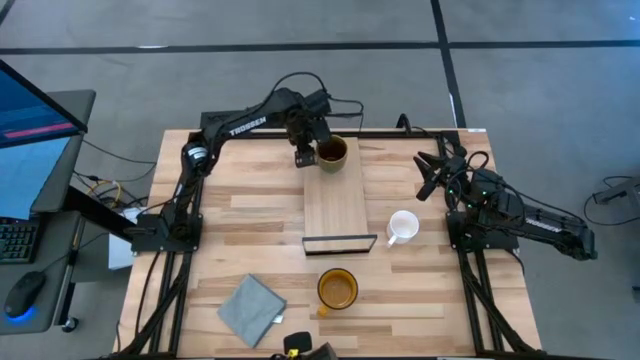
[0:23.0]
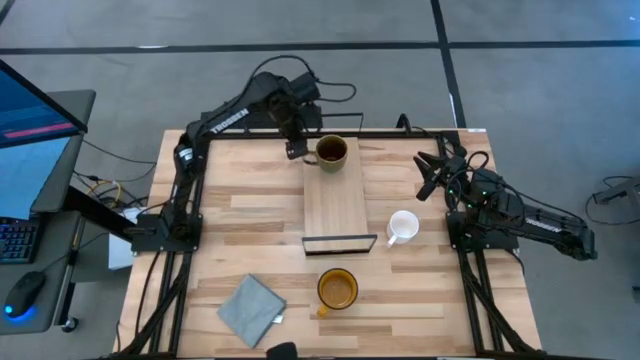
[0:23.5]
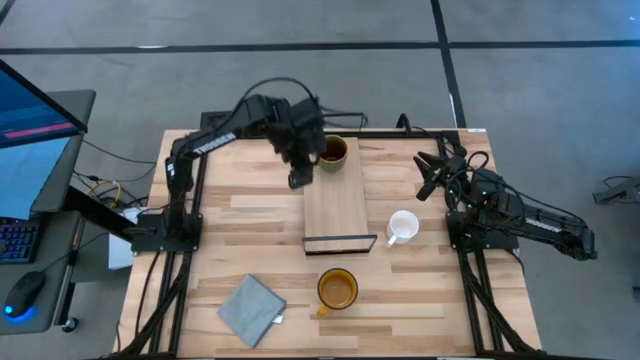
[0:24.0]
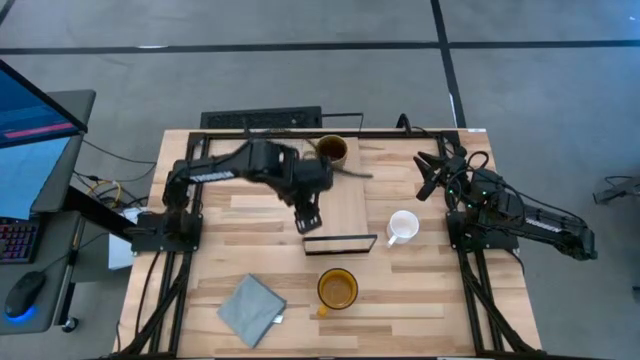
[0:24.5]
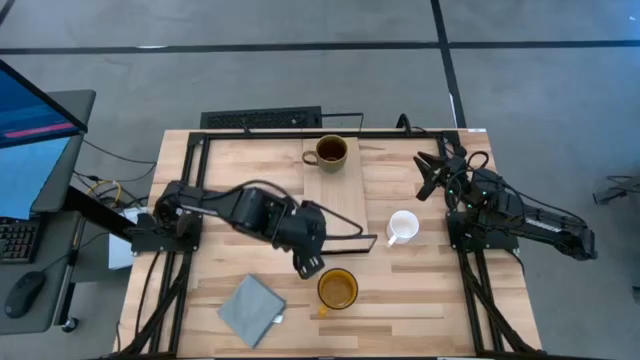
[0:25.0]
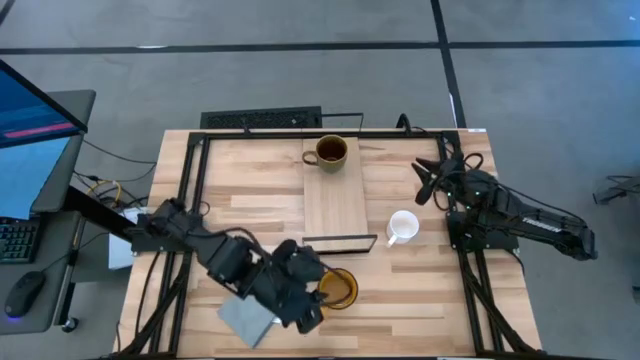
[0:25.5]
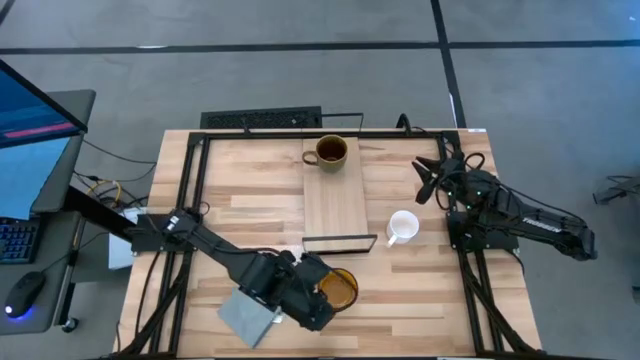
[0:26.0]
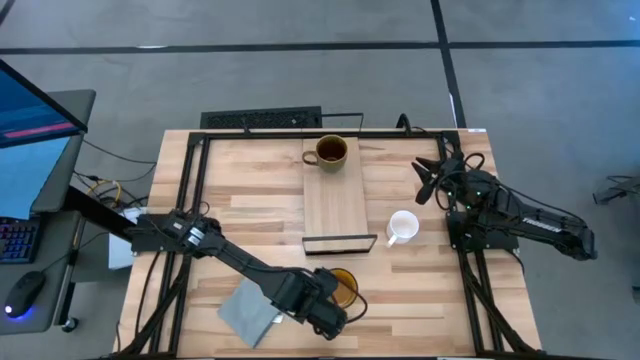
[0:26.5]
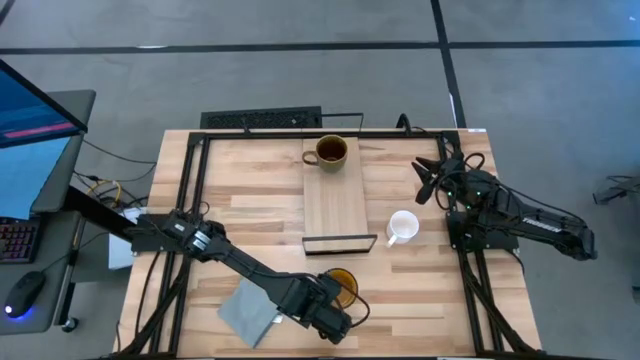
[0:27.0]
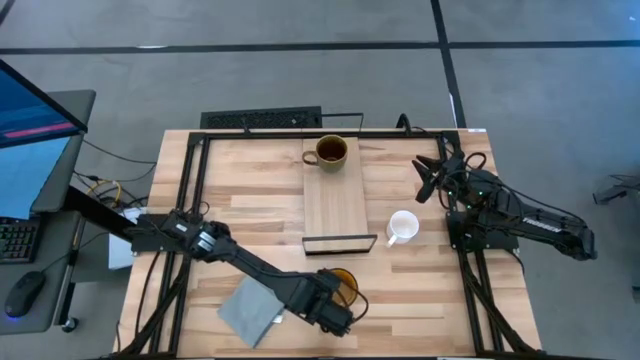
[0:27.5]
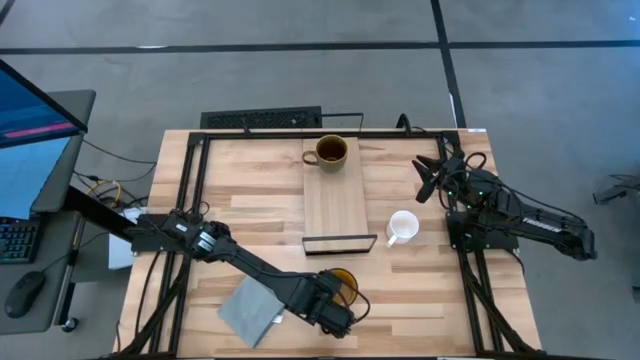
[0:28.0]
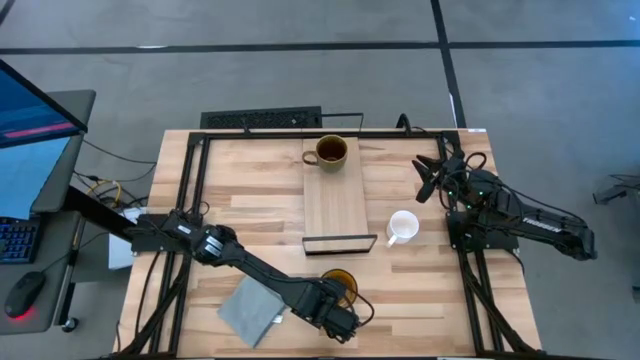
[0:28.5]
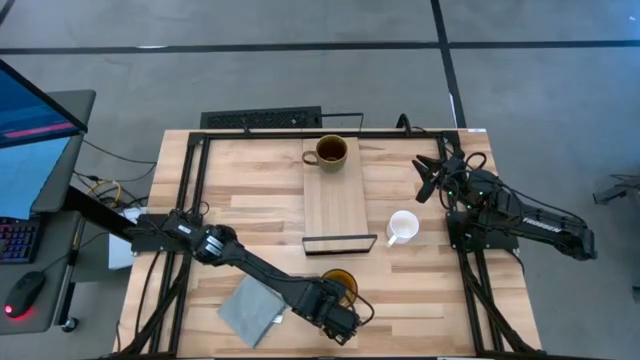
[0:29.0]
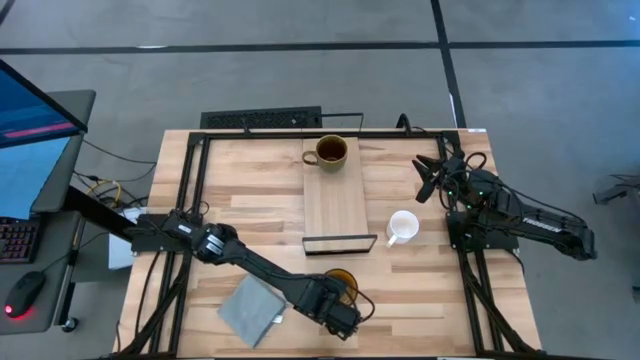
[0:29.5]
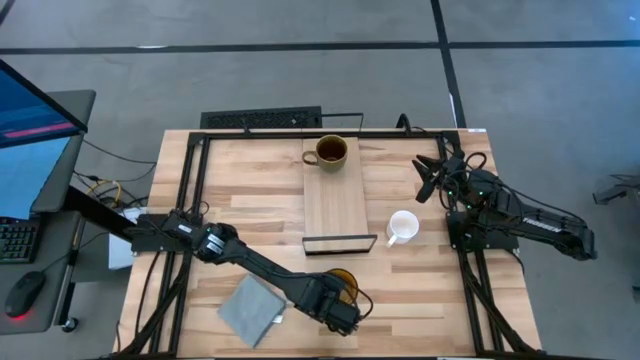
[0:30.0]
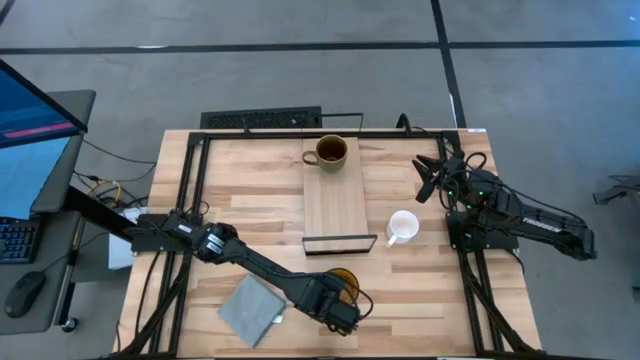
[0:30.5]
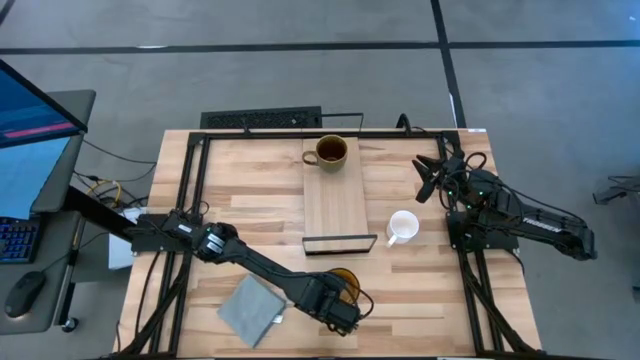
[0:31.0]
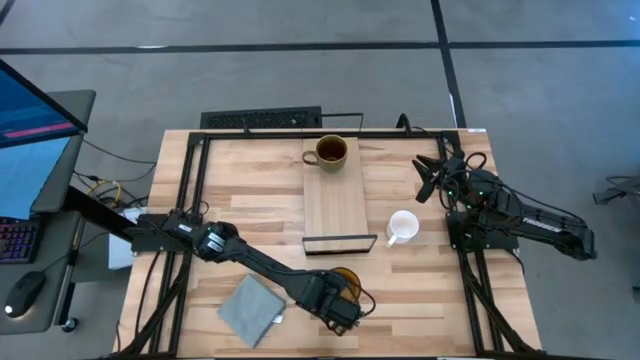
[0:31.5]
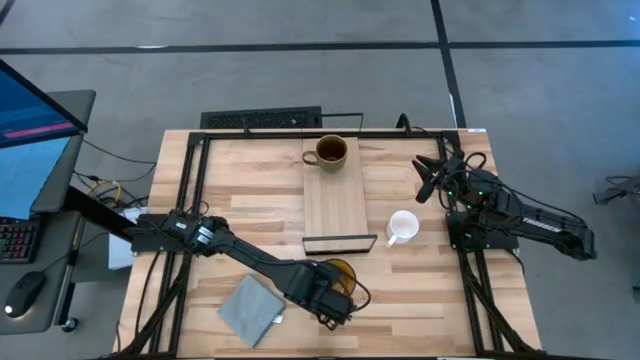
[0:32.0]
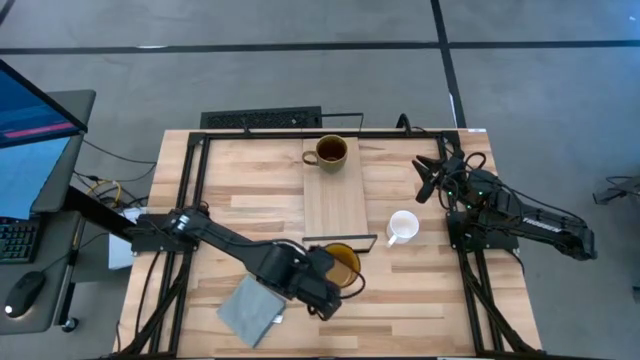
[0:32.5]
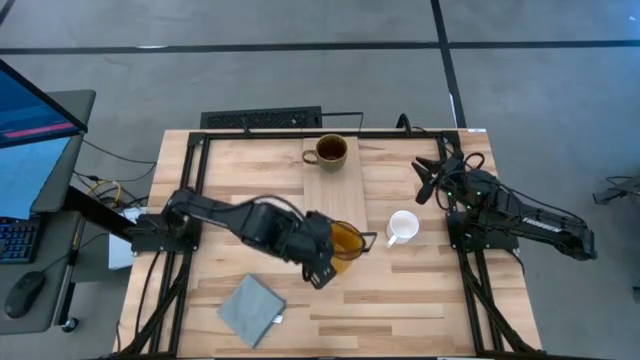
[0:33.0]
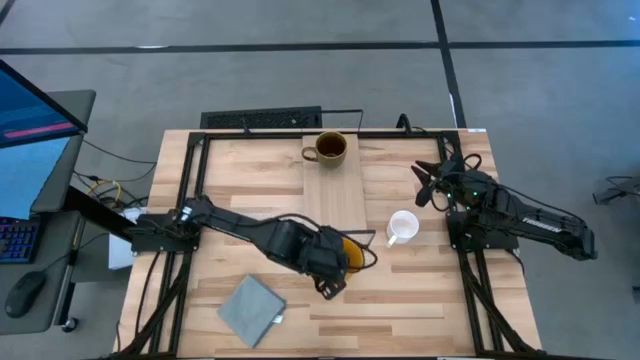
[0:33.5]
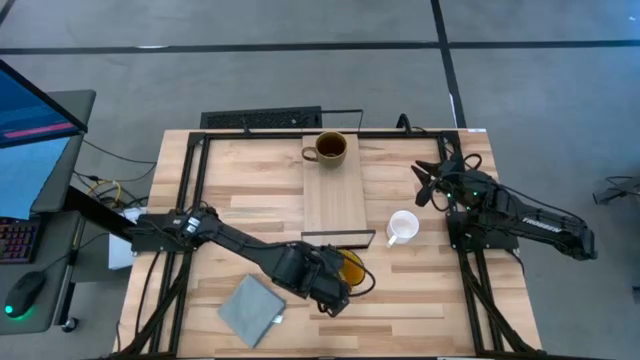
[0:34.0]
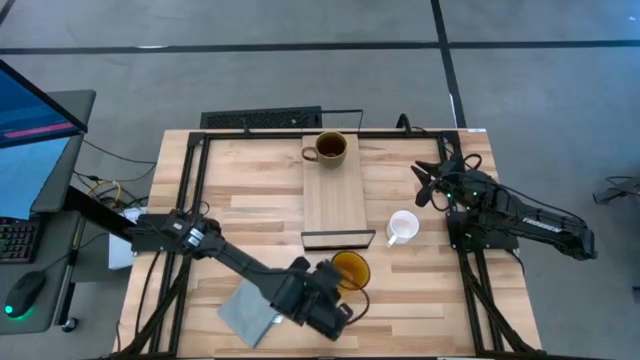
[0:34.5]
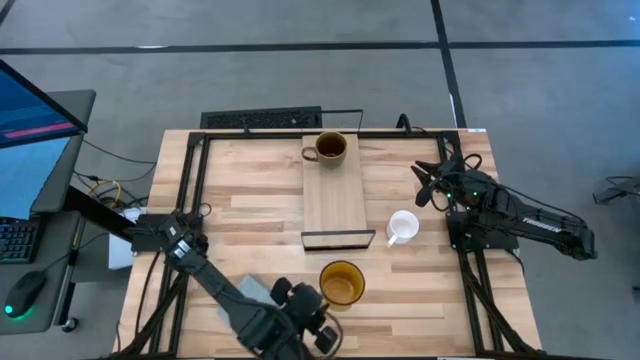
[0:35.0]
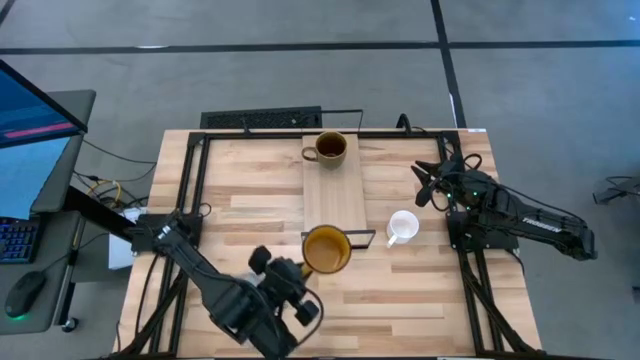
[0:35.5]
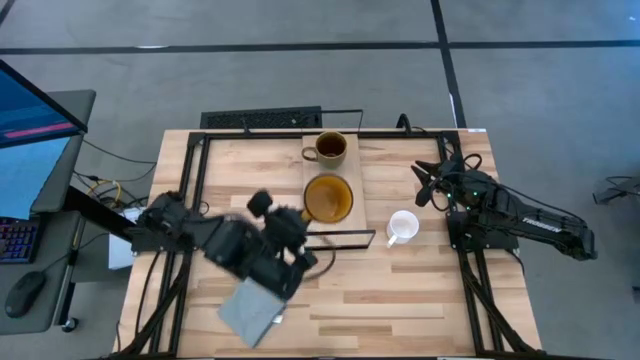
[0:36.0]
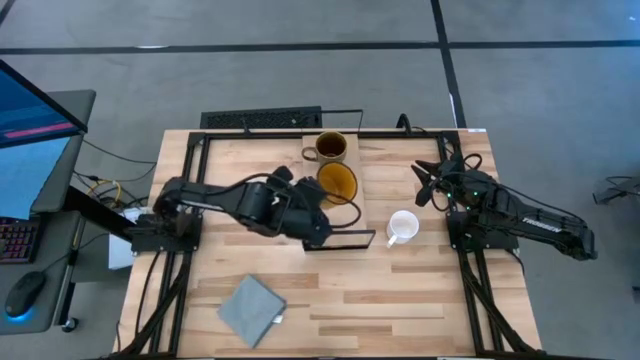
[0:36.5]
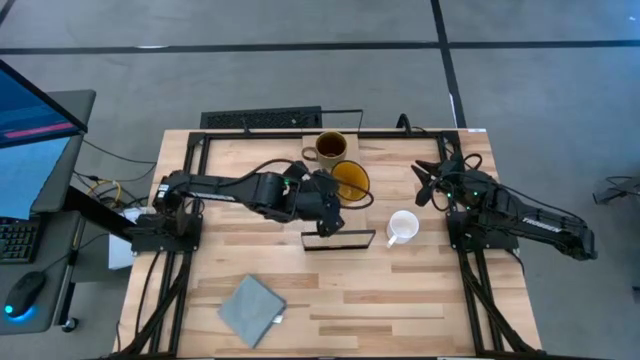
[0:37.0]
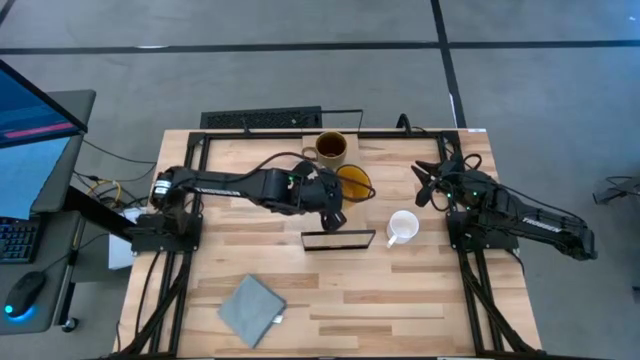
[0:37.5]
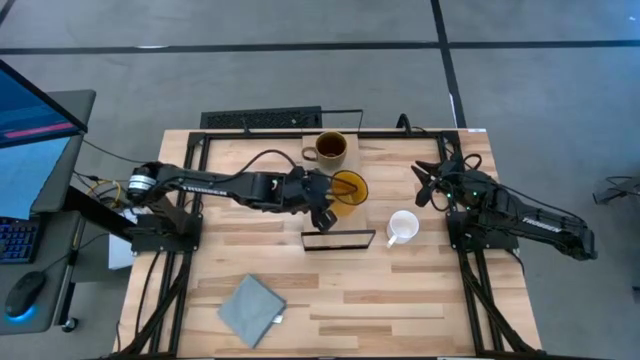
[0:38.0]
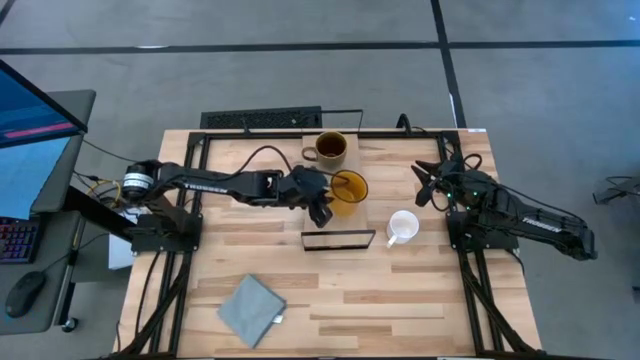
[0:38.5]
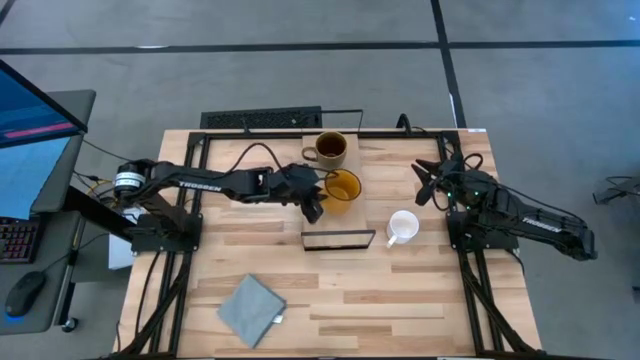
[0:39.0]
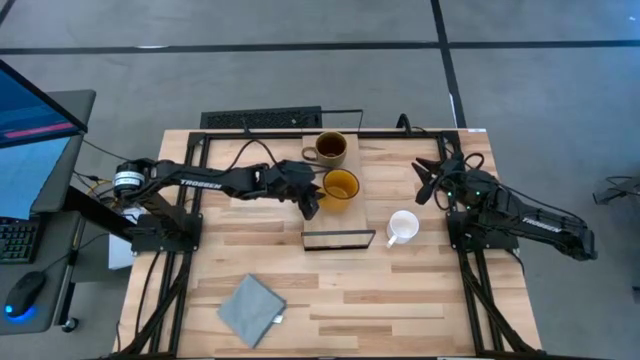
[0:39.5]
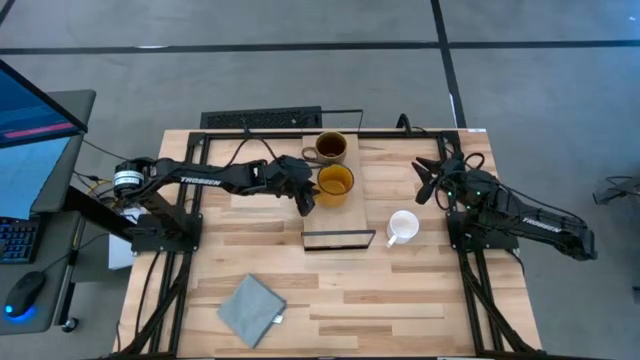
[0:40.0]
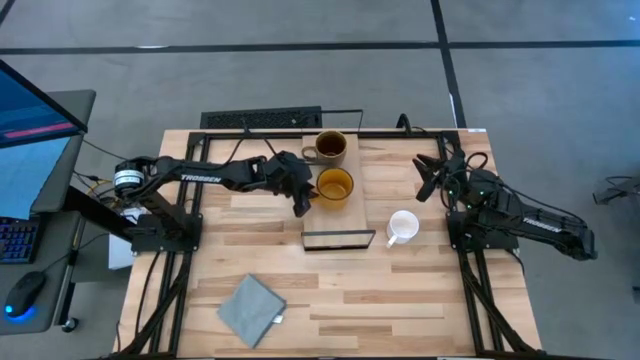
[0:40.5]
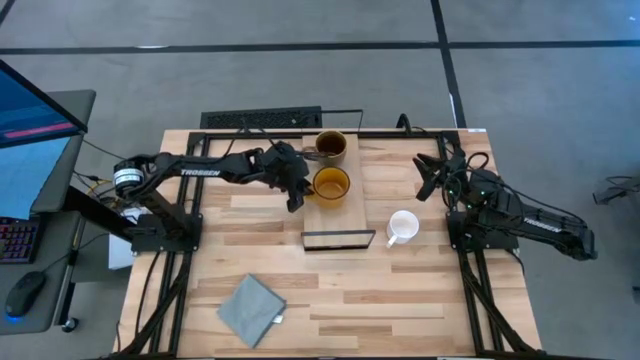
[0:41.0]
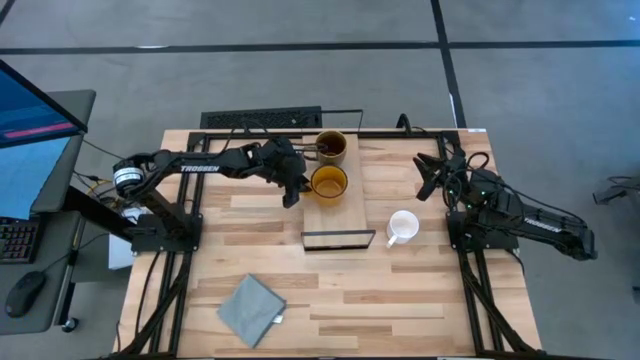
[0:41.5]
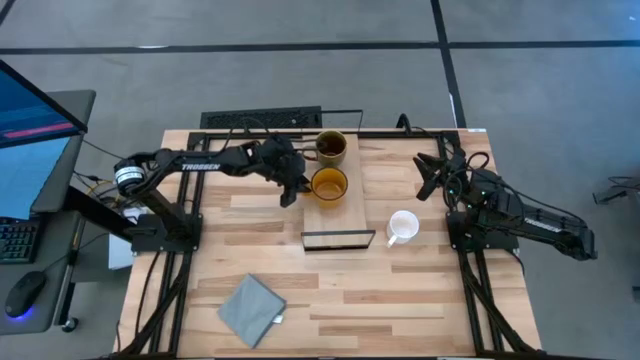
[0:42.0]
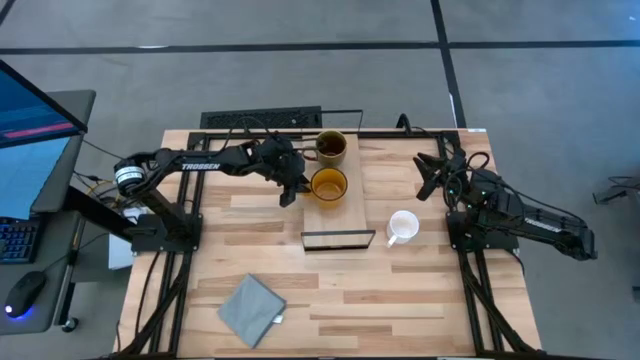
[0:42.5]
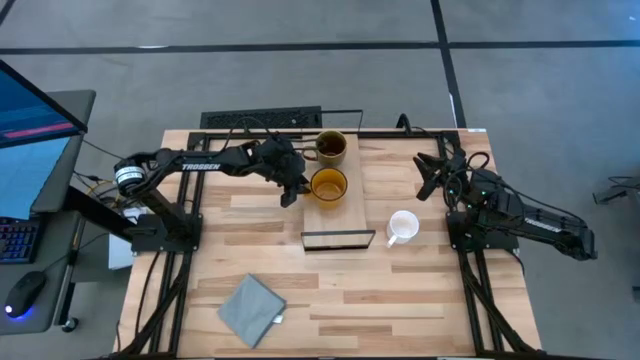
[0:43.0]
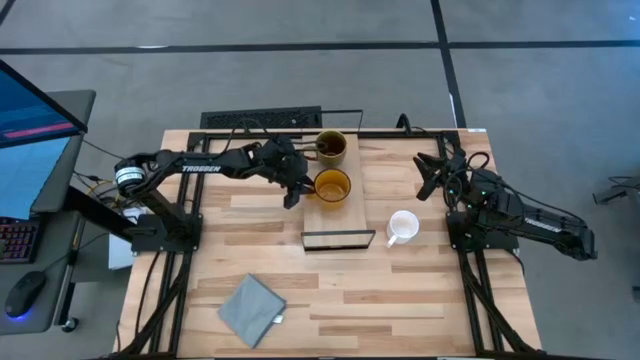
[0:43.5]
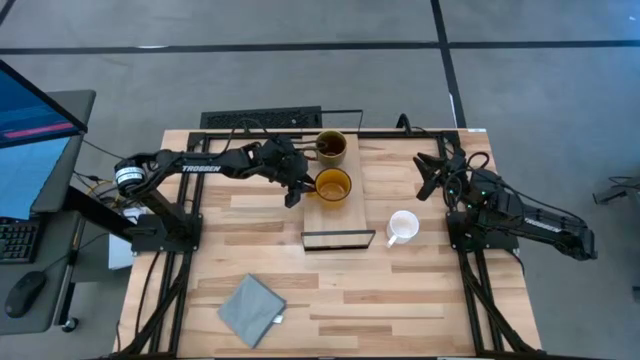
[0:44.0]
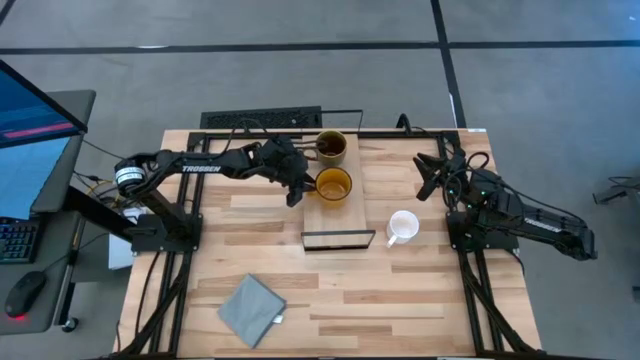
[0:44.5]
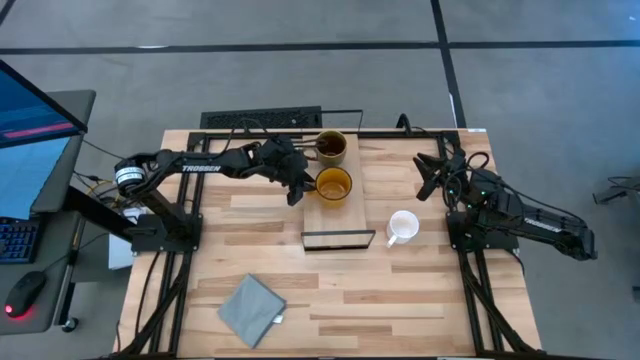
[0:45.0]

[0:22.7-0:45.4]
Task: Stack small to large cups/mugs on shelf
Put the yellow mug on the shelf
